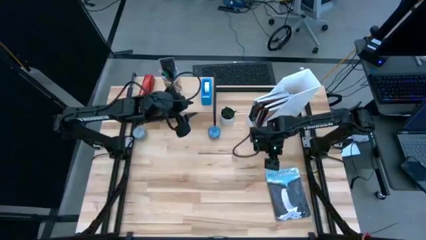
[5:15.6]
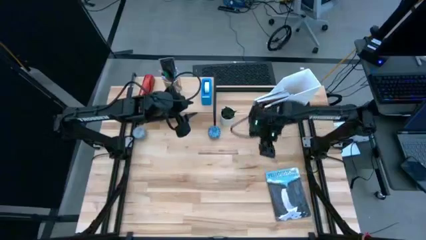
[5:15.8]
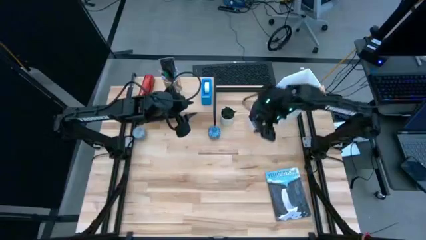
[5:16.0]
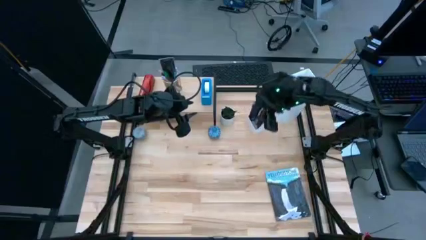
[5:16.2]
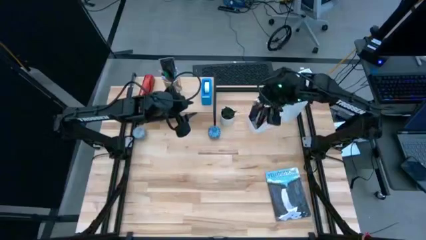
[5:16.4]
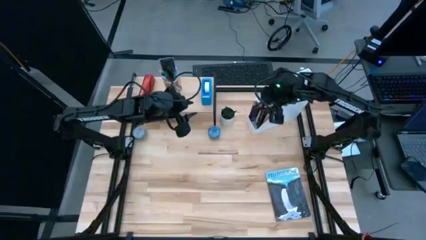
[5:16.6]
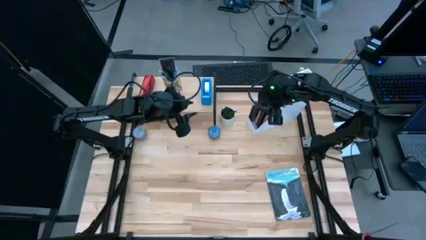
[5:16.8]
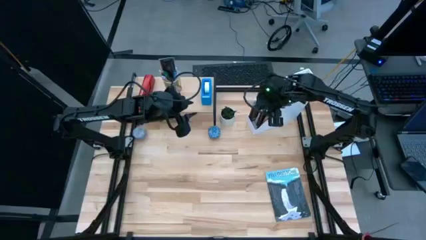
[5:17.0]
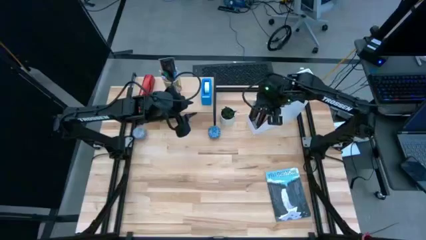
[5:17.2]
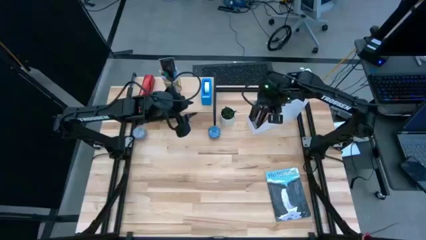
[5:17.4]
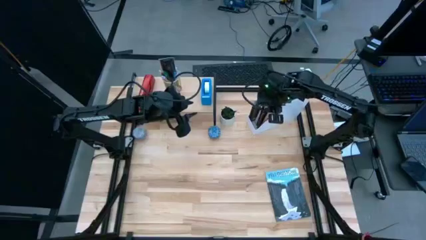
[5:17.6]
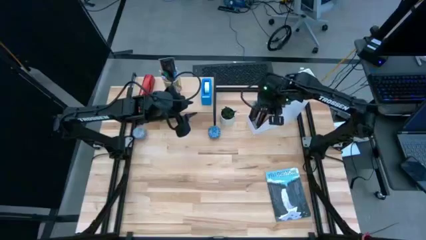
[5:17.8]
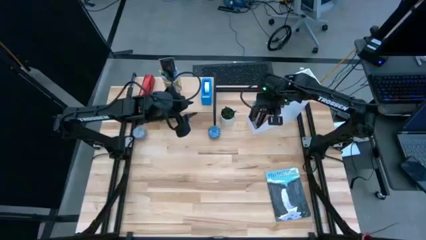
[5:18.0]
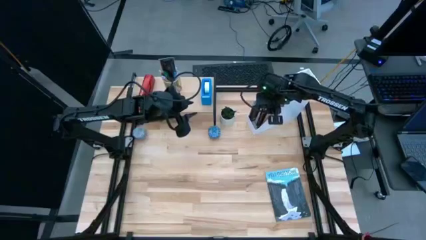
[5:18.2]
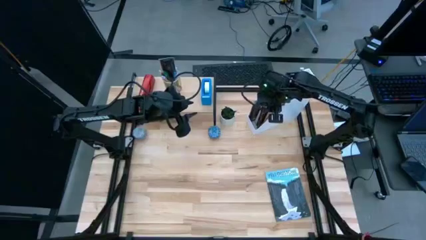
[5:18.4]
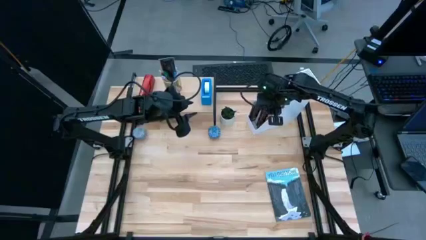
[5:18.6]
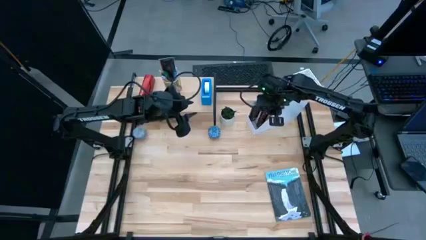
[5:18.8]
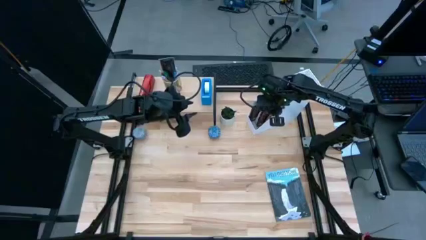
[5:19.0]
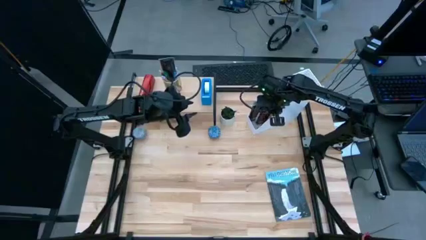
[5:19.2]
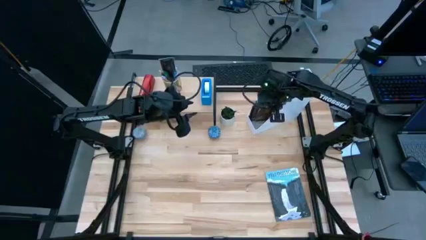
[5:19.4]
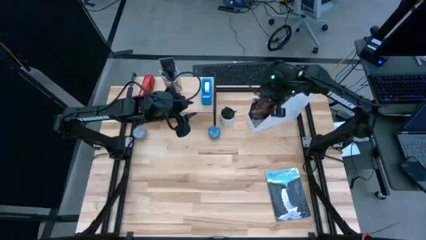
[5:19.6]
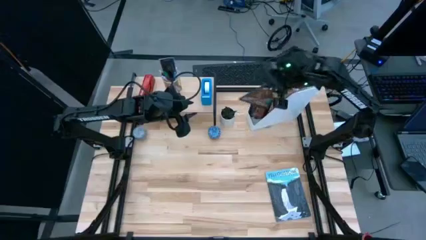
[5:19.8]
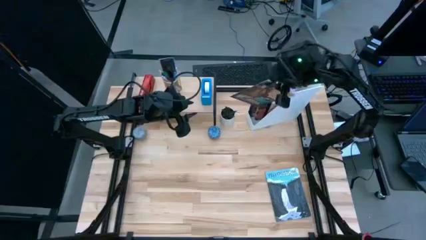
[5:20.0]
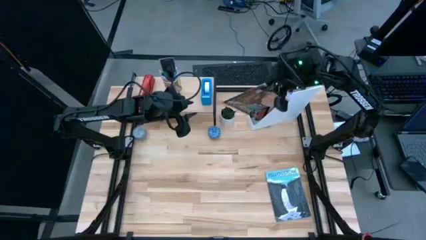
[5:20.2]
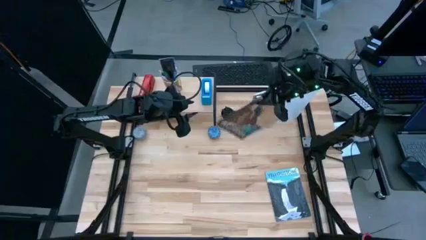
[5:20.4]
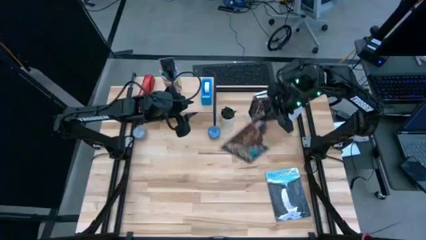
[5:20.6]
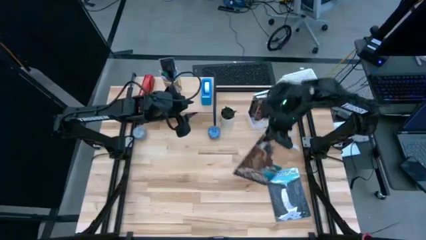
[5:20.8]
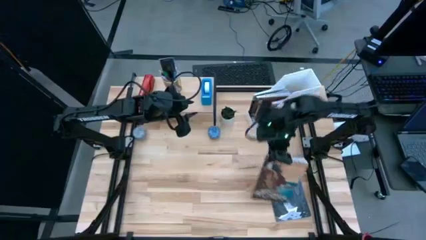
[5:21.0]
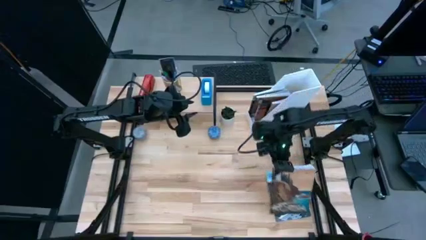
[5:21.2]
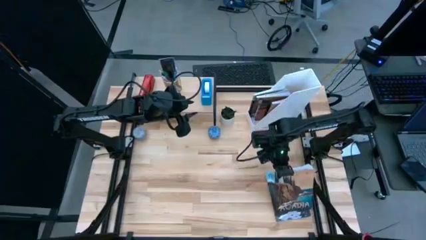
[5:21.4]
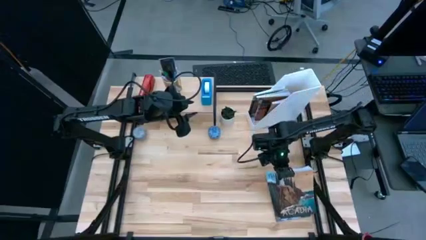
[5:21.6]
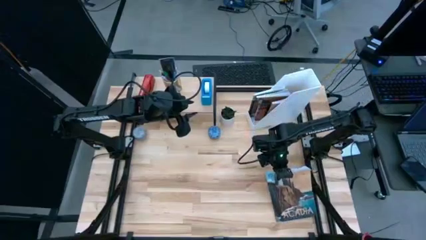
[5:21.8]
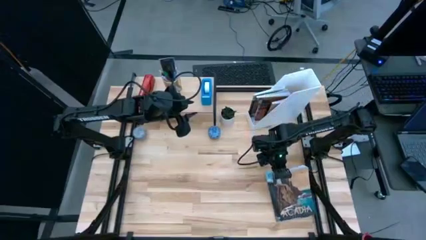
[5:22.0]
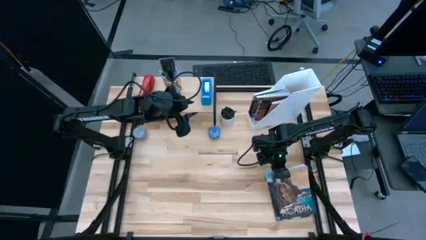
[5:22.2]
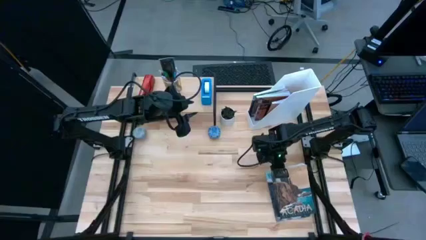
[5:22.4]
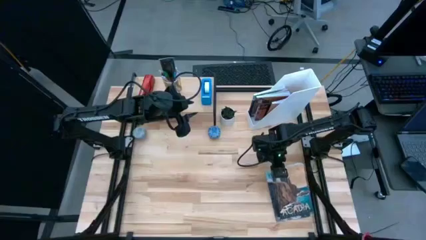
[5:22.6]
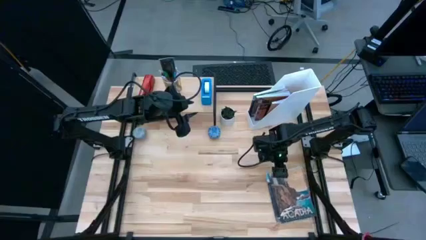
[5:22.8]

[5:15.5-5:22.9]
Task: Stock shelves
Remove the blue/brown book from the white book shelf

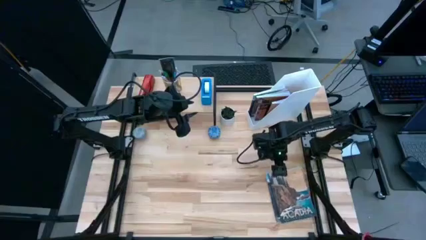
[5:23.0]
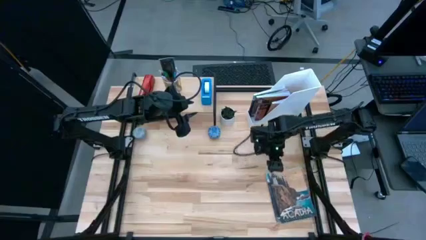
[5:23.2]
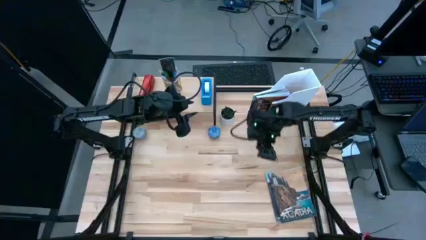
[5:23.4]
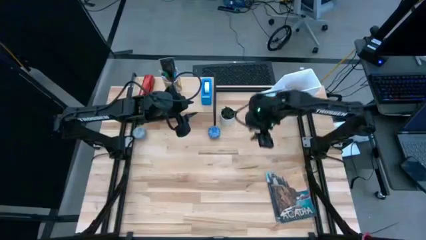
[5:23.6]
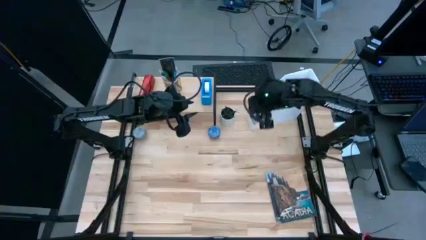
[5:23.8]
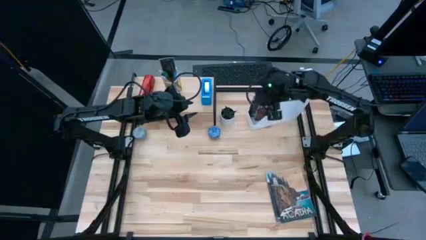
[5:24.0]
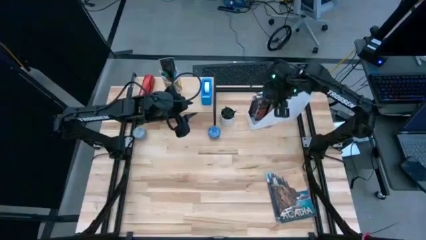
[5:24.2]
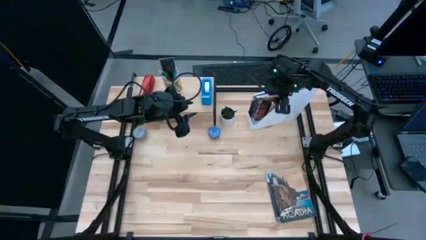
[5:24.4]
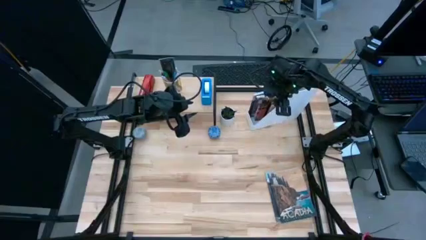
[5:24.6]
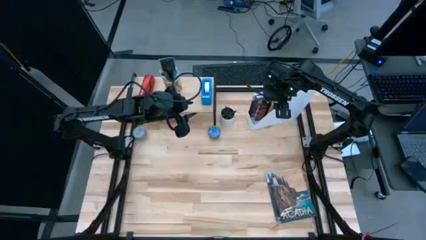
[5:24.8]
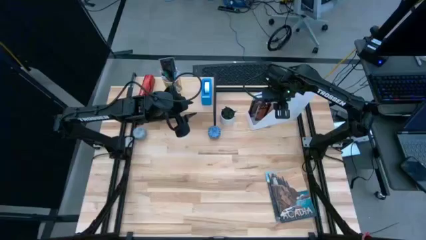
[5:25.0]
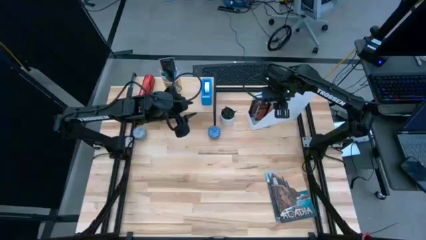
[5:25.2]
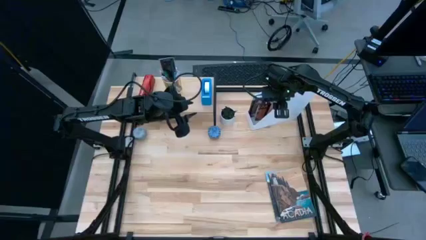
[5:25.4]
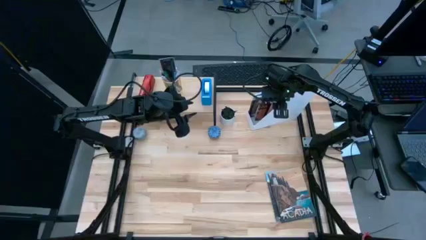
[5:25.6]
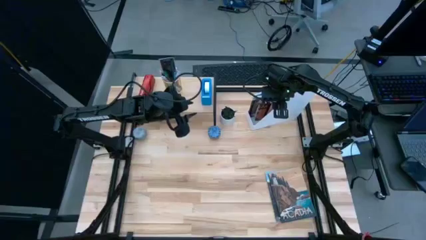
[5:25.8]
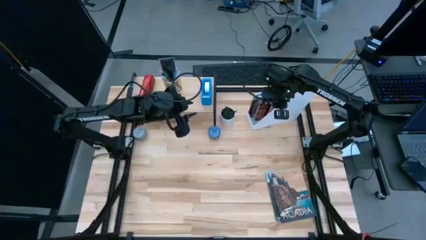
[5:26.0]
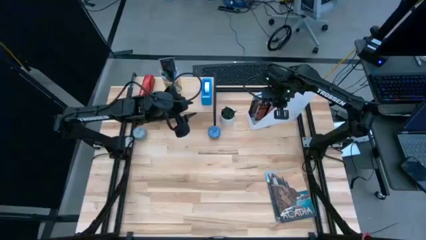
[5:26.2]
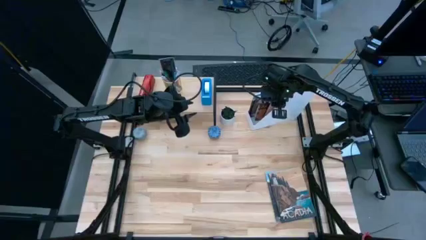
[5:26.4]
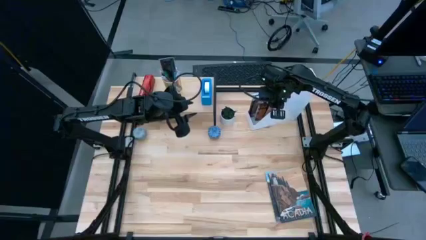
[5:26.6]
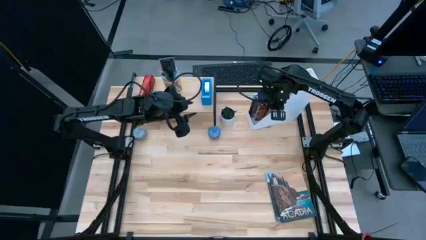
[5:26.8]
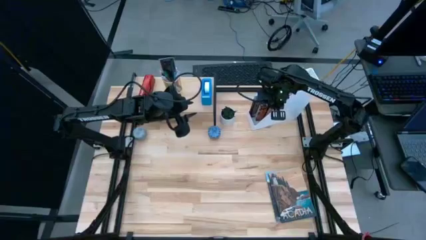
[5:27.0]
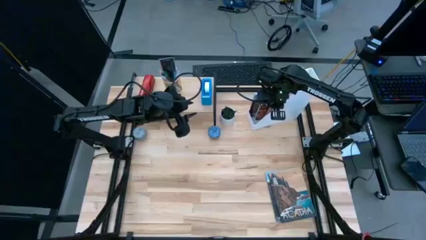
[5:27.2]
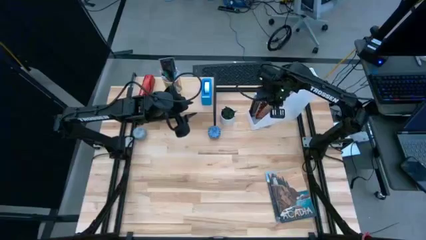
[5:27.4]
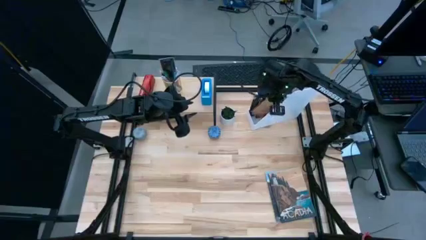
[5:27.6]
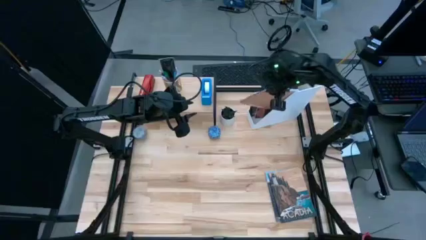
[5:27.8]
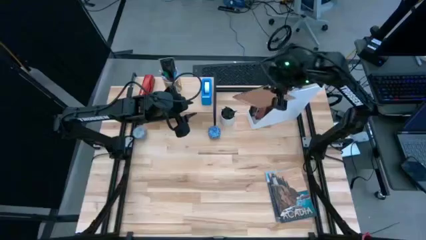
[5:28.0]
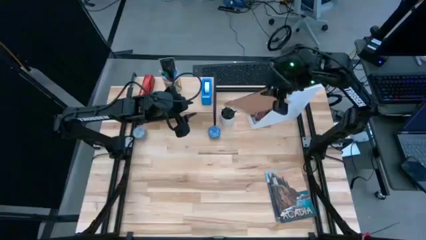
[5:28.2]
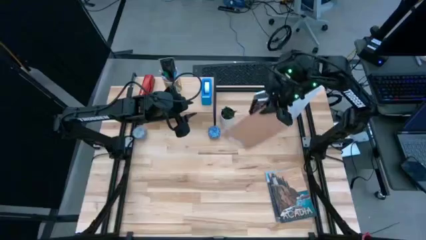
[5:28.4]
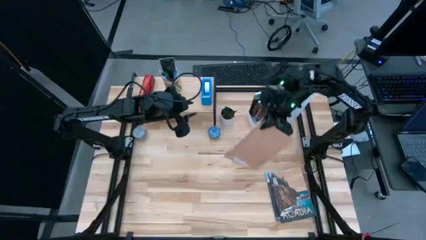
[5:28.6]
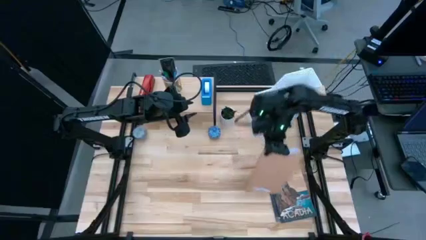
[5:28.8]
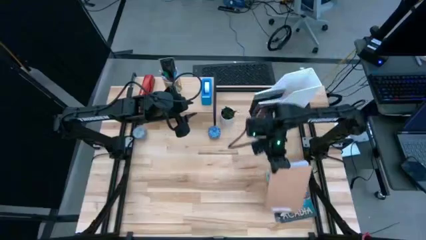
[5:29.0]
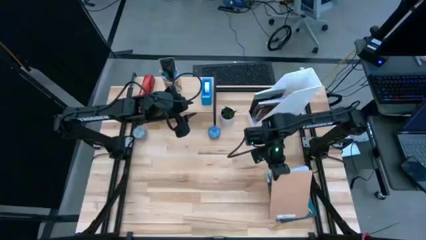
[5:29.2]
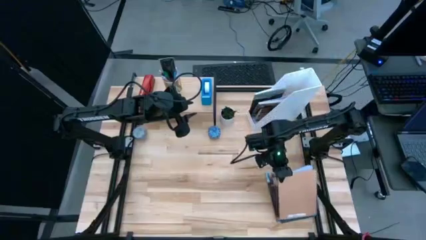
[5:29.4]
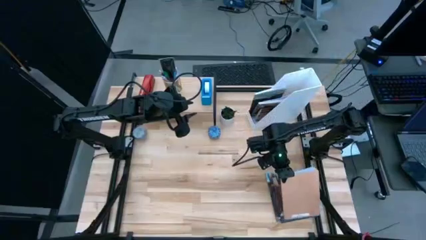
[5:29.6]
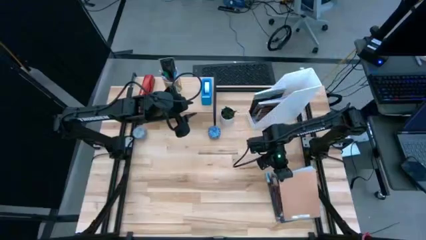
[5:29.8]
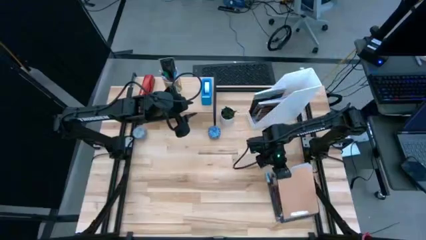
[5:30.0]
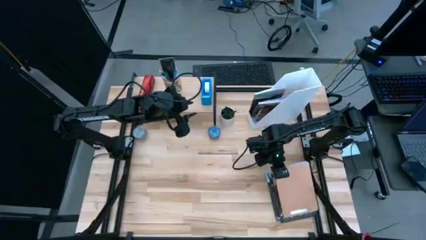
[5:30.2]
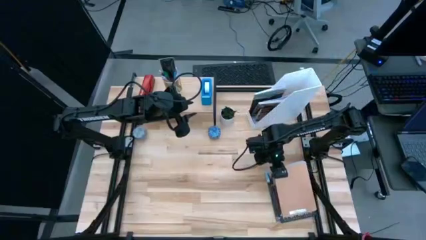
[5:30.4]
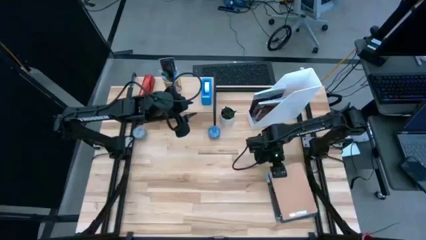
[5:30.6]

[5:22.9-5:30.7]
Remove the blue/brown book from the white book shelf

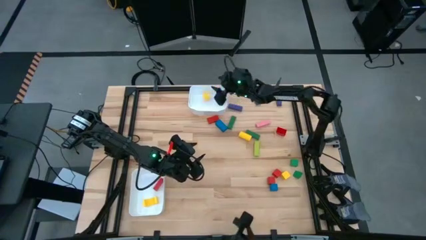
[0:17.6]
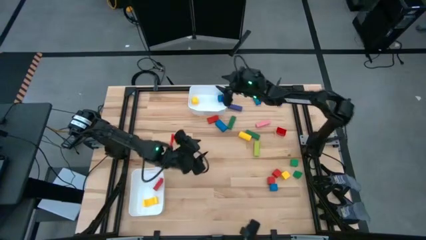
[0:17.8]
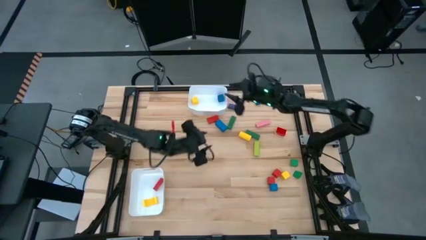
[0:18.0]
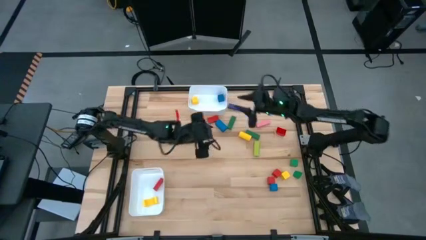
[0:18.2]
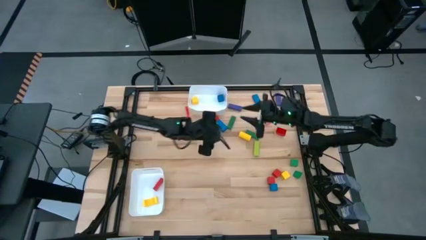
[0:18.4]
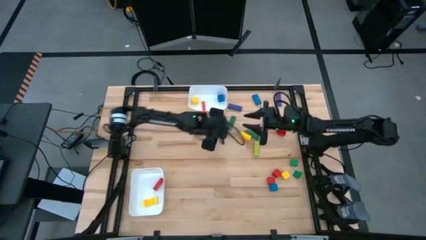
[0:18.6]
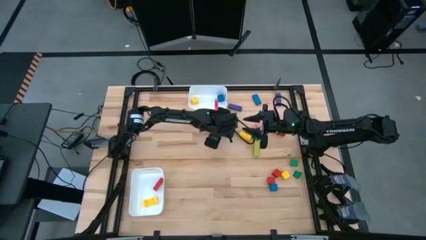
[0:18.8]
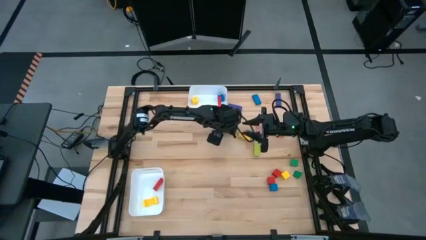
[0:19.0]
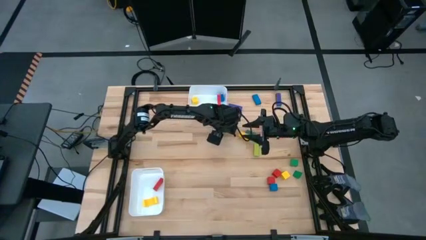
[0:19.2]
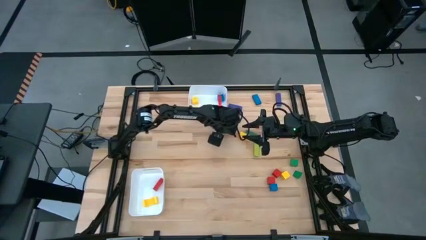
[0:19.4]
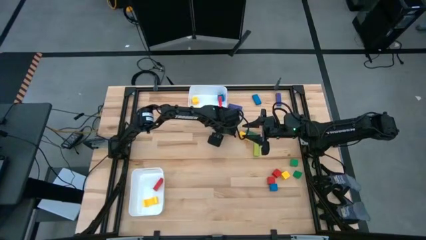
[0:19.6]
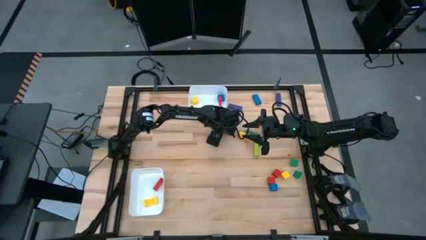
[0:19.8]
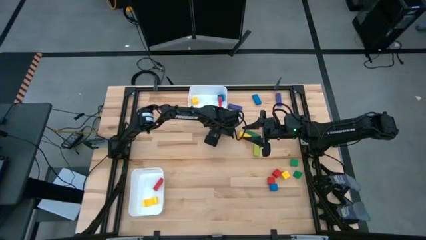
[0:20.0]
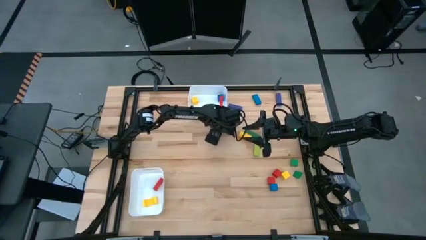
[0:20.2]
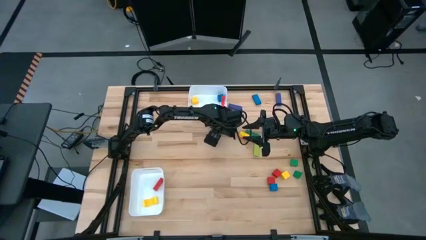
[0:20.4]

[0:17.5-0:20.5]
Task: Sort blocks by size
Put the blue rectangular block into the bottom white bin
